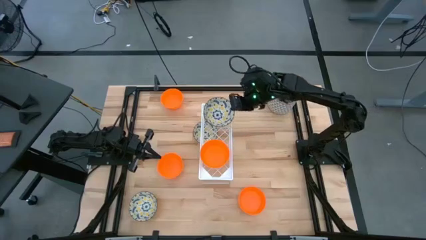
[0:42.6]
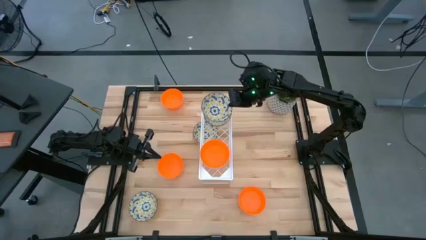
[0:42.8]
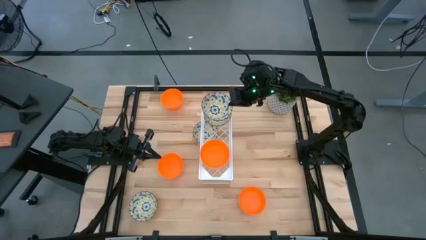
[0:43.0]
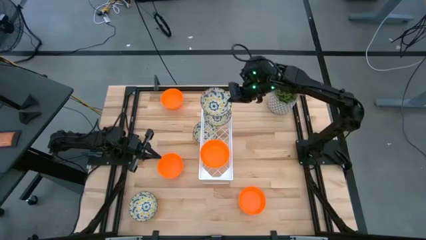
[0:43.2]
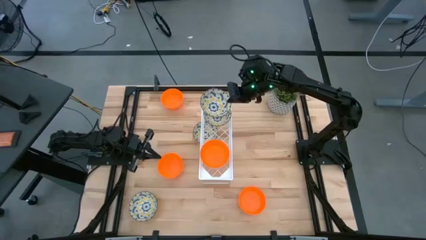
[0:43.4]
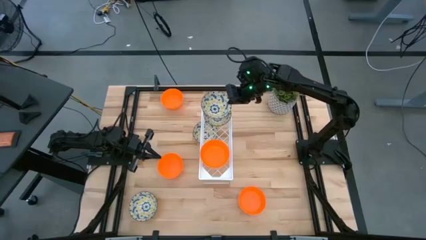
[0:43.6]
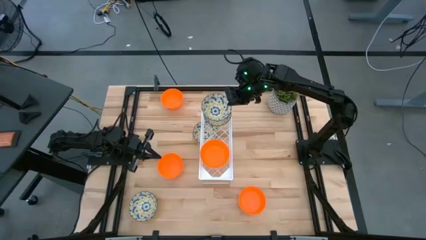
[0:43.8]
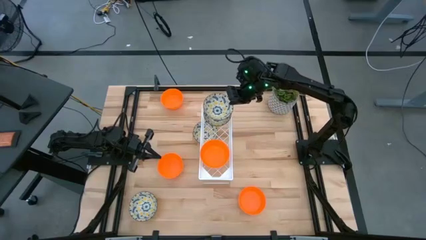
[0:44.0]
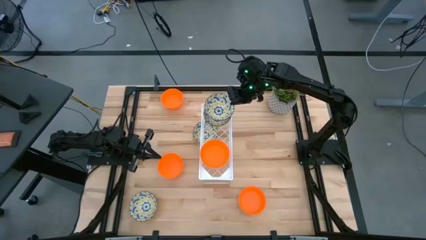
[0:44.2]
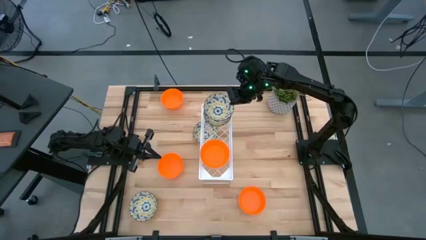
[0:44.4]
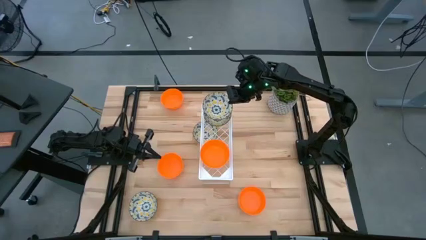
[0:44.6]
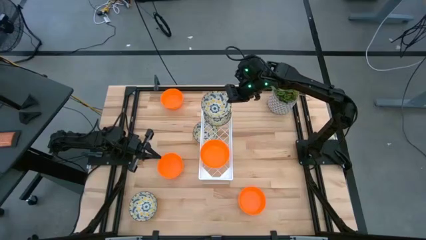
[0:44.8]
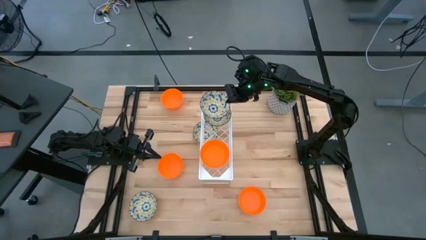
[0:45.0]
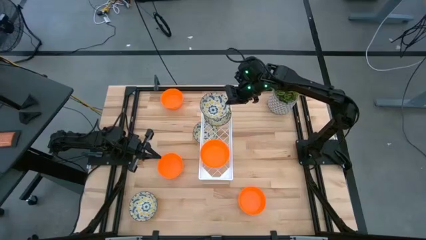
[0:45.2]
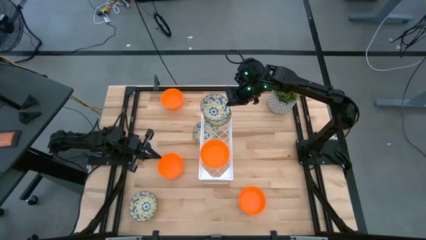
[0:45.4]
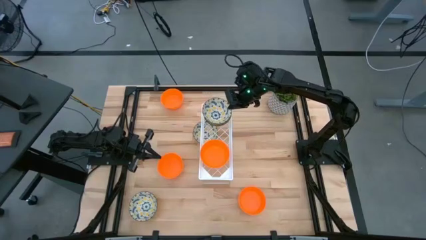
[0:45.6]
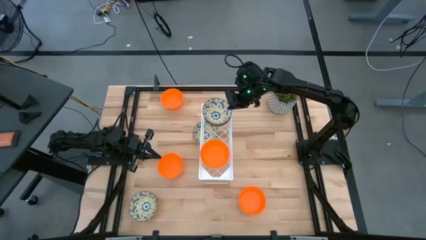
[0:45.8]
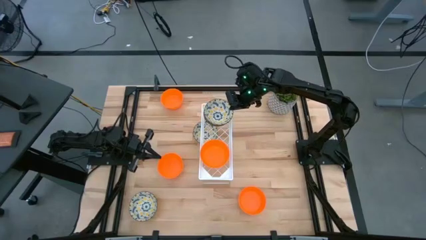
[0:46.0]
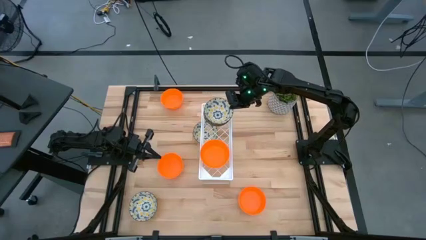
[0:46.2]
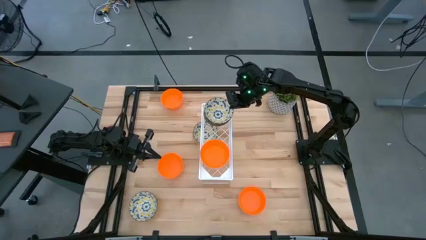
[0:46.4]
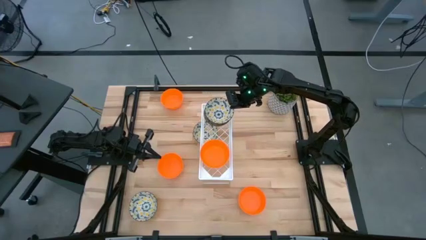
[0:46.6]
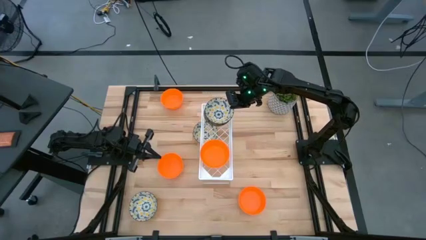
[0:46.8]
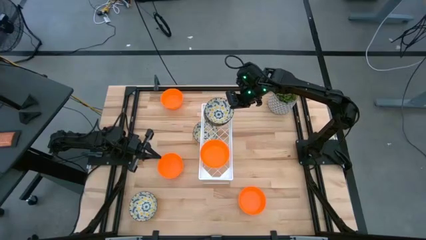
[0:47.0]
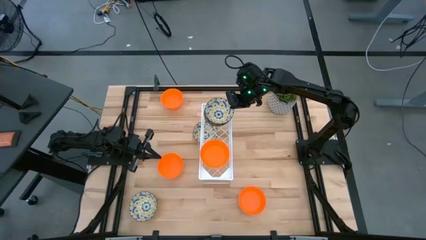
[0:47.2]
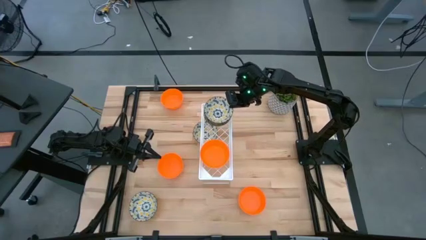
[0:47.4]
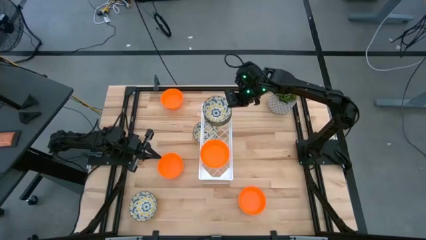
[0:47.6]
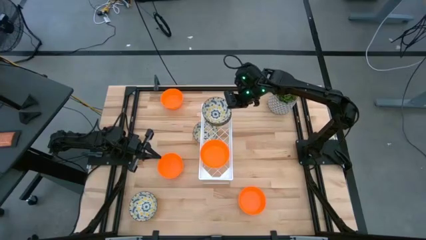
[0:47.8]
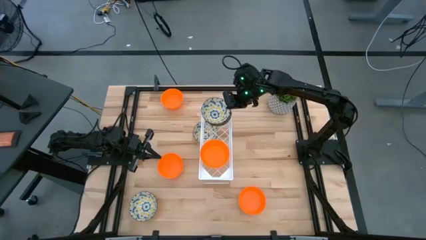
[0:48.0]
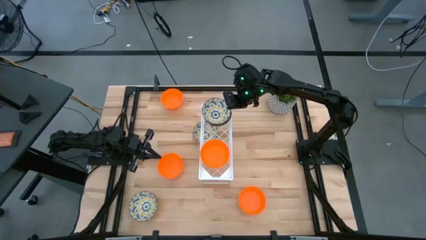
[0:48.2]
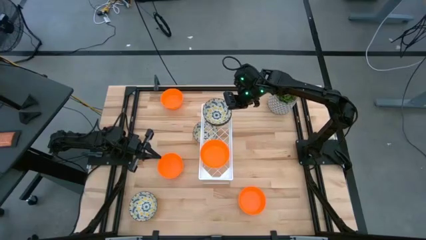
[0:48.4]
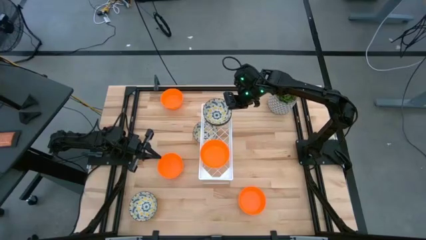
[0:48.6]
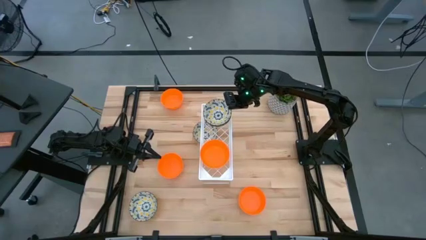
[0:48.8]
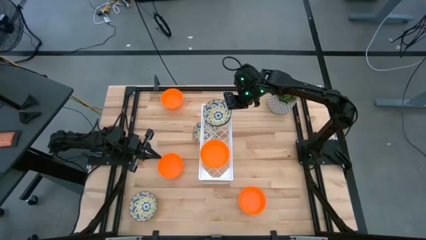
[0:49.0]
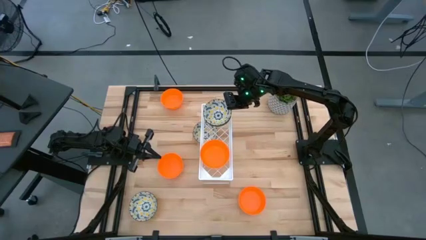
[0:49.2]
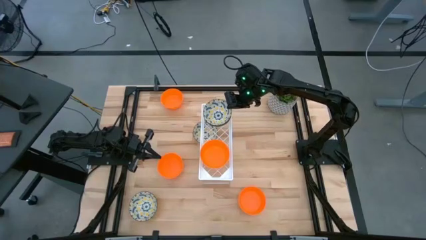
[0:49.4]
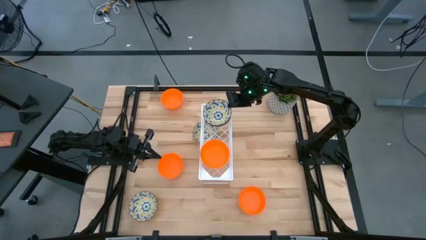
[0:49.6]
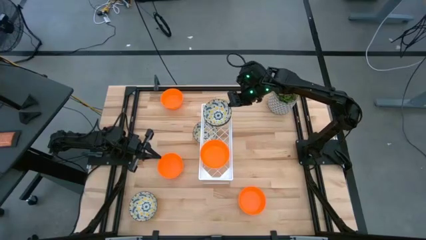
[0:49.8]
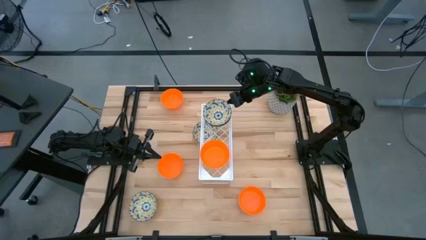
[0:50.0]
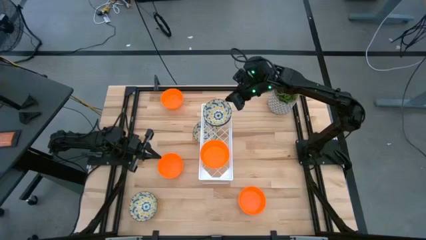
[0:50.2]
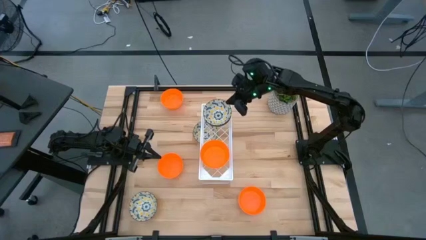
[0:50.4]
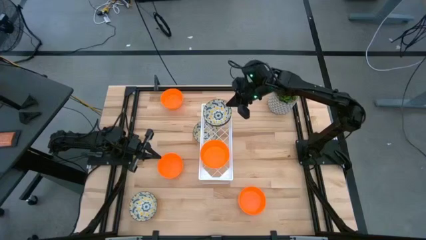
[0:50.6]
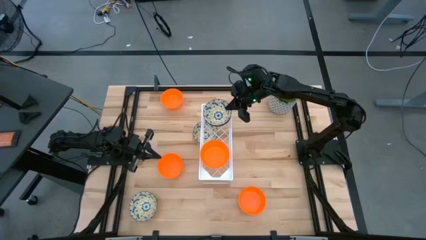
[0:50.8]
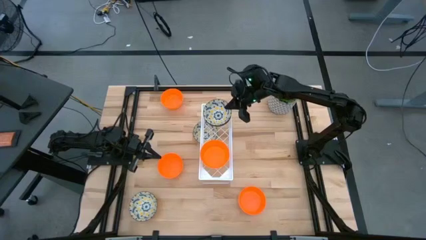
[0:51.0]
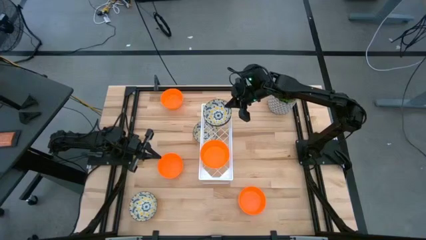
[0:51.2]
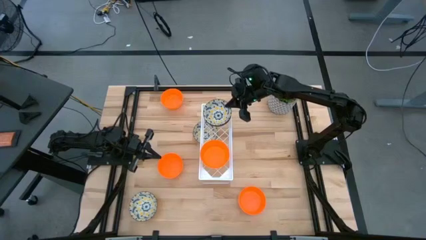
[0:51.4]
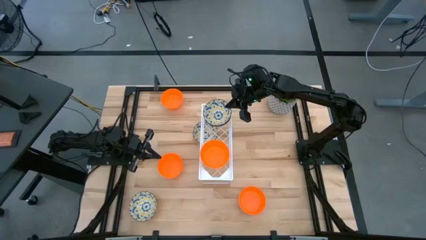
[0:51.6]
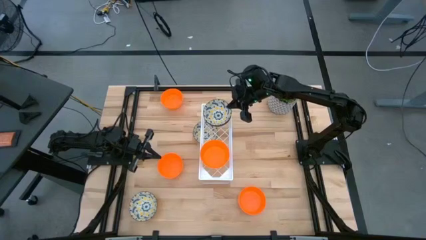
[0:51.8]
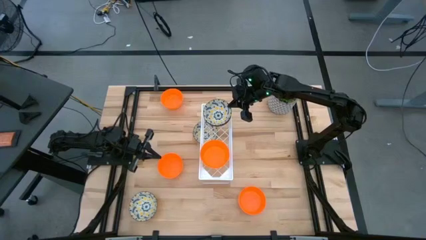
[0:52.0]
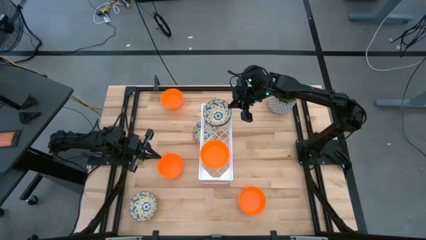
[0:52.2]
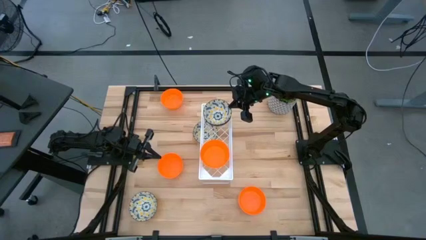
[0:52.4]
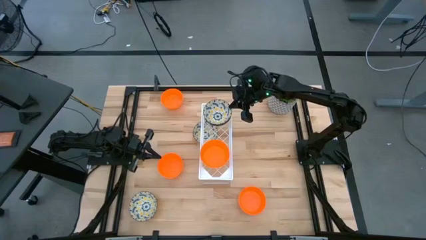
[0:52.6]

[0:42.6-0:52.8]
Task: Pick & Place Mini bowls
Stack the yellow patterned bowl on top of the yellow patterned bowl on the shelf

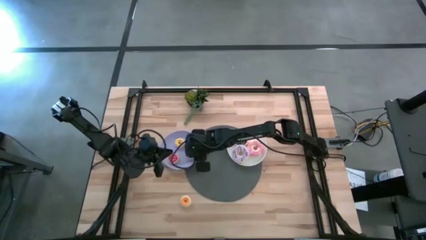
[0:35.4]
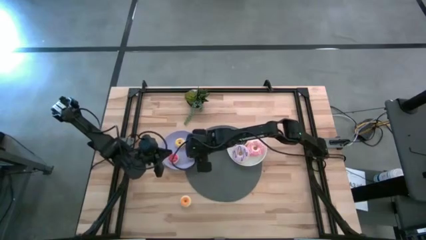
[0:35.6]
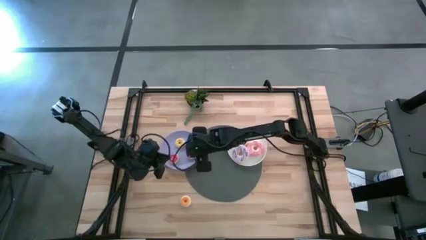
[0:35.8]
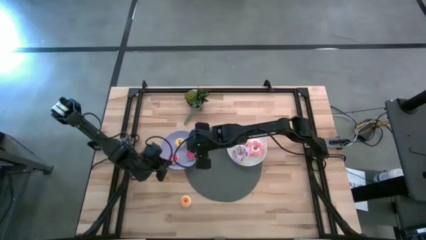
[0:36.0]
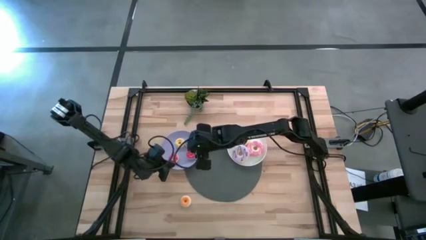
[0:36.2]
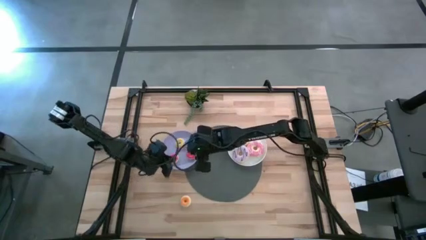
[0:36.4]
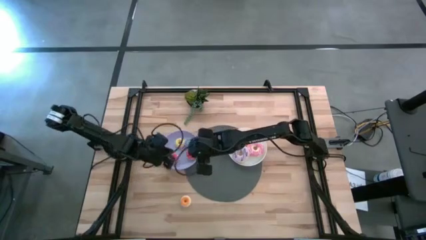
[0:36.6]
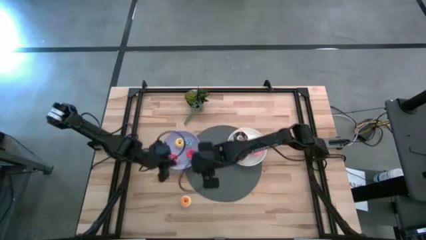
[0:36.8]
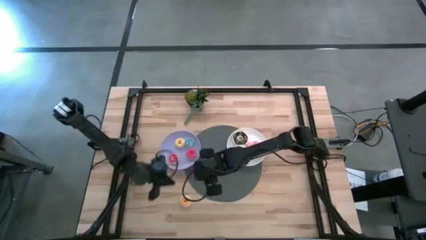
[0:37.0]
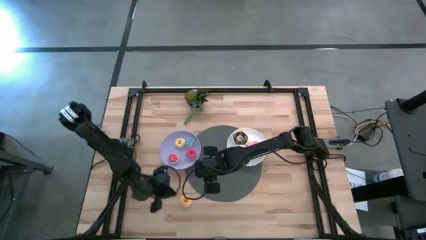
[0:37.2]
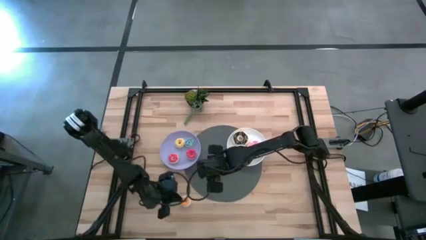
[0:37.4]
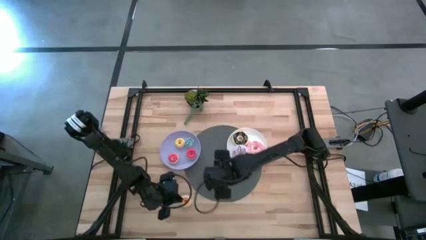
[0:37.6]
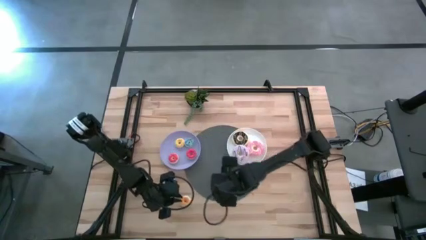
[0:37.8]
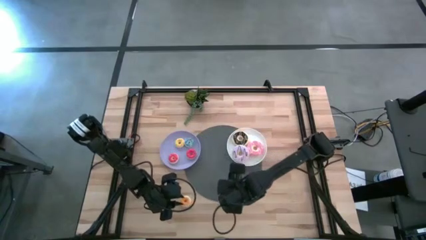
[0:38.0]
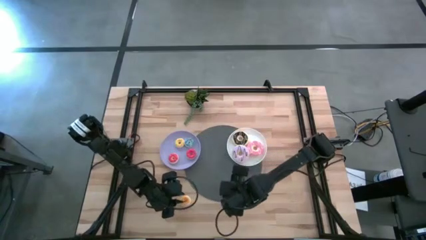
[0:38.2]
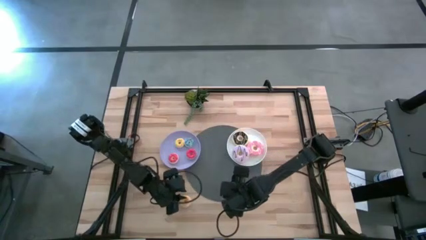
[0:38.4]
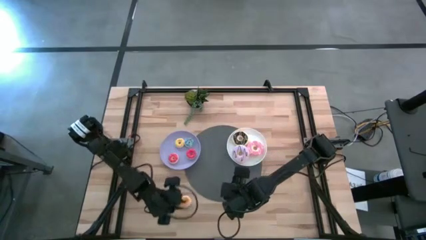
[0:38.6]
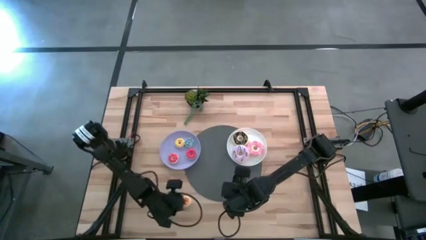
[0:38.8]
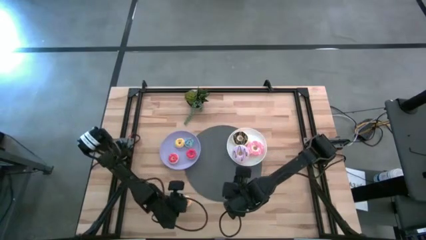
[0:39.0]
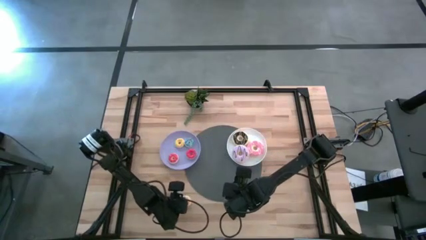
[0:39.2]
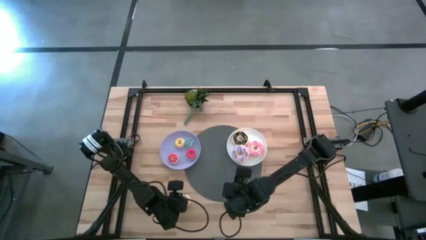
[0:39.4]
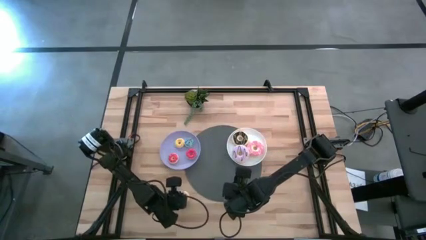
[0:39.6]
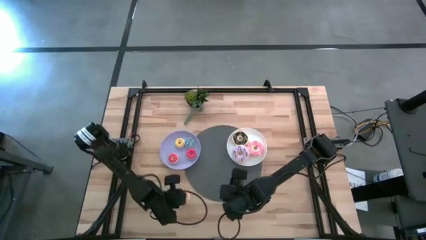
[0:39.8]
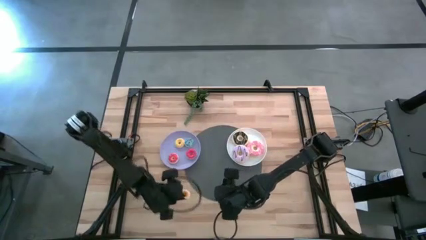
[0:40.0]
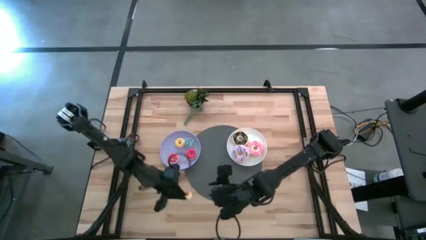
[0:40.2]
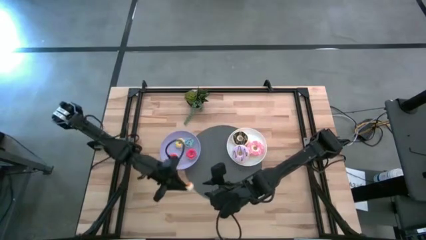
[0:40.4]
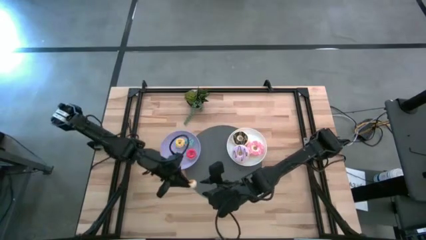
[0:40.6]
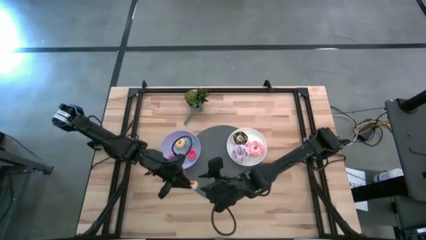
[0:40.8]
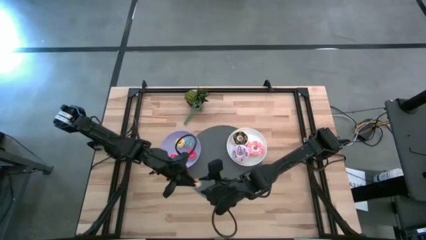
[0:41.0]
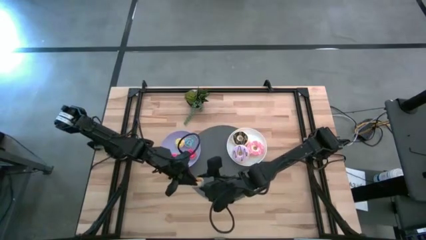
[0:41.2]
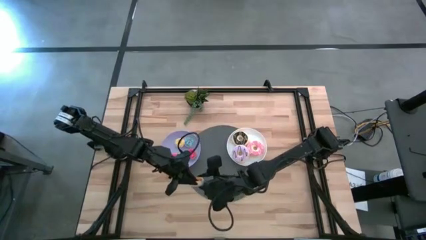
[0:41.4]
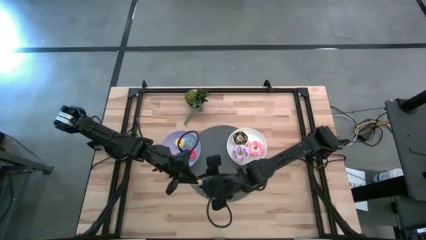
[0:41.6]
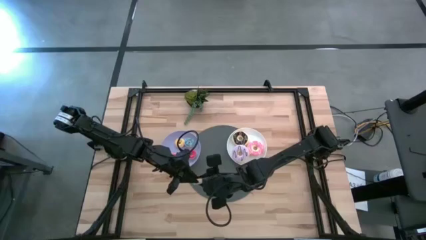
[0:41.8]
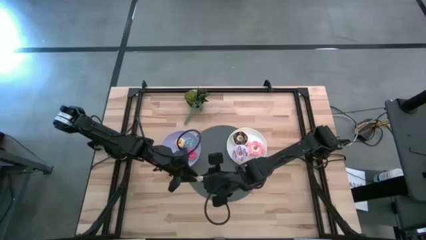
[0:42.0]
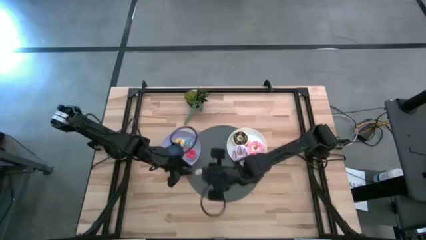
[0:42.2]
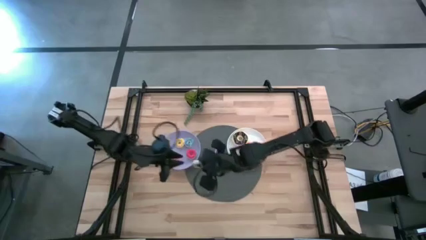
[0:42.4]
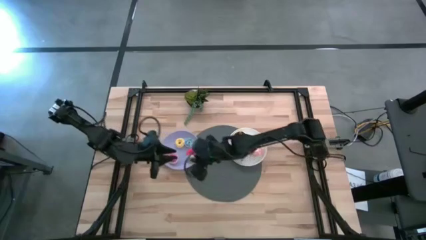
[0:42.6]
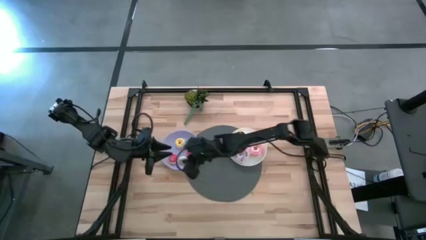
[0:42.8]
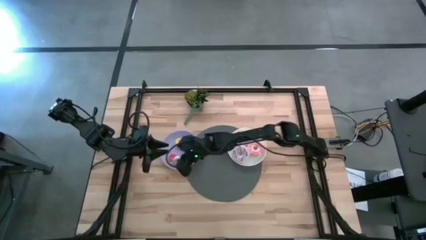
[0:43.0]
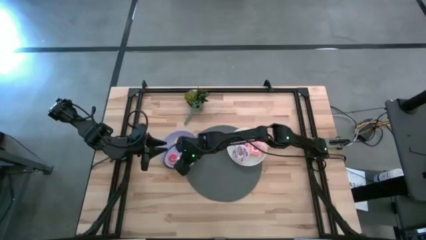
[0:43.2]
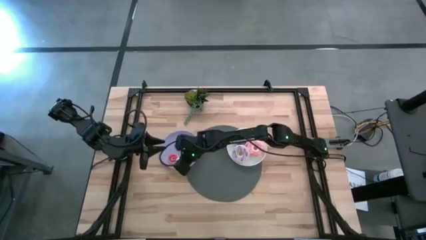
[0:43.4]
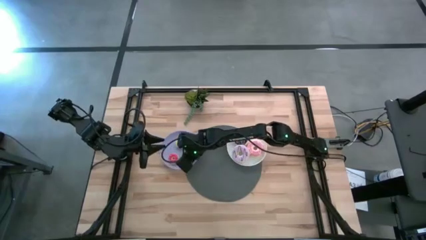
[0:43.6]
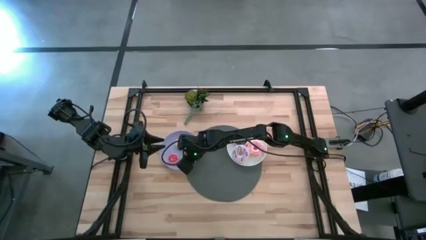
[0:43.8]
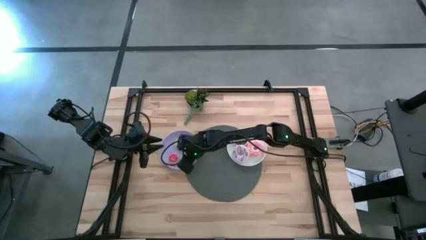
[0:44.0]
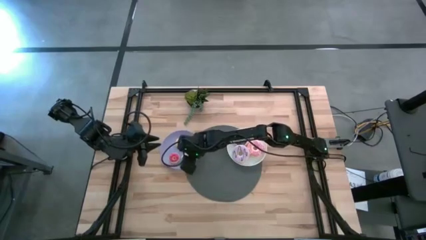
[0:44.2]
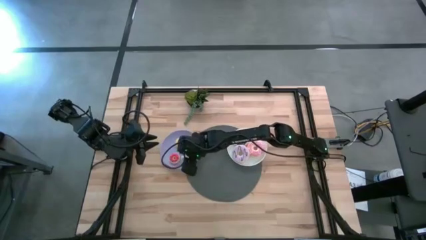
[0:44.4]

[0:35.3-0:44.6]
Task: Pick & Place donuts
Put the small white donut on the purple plate
